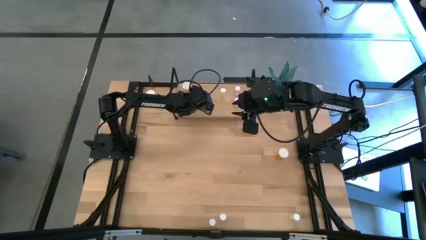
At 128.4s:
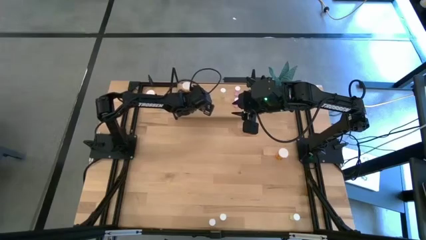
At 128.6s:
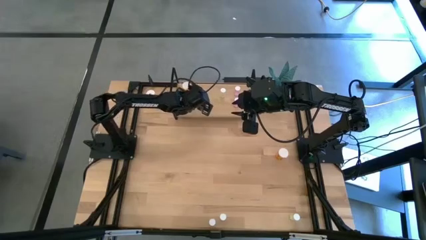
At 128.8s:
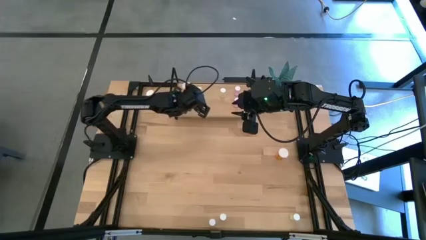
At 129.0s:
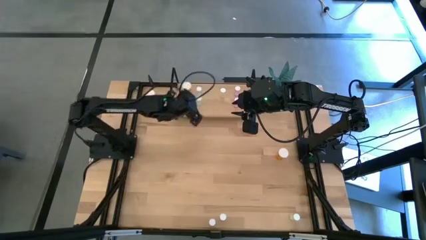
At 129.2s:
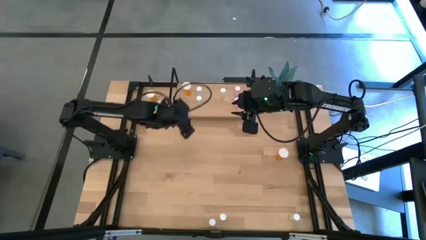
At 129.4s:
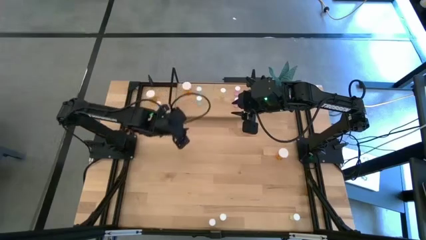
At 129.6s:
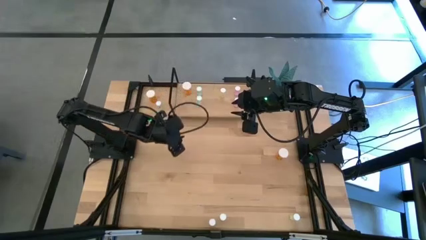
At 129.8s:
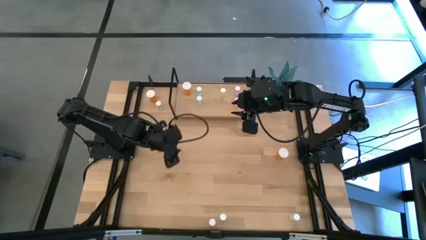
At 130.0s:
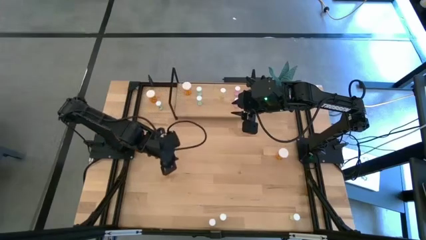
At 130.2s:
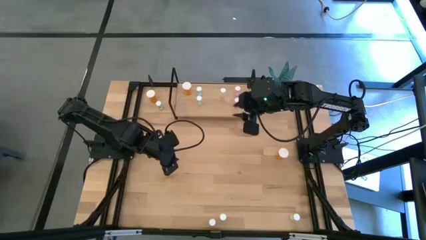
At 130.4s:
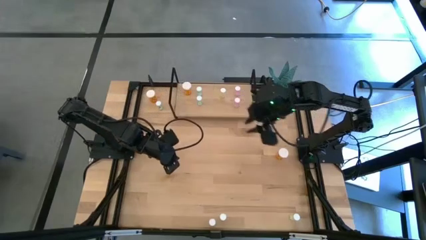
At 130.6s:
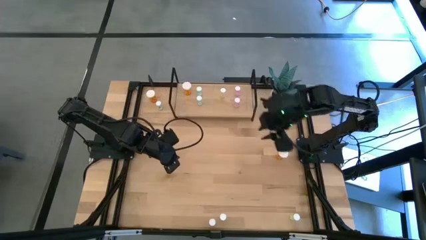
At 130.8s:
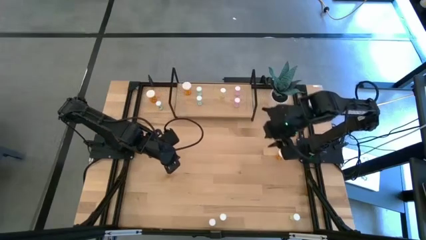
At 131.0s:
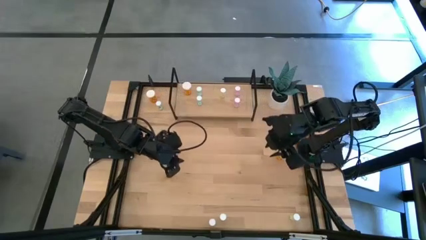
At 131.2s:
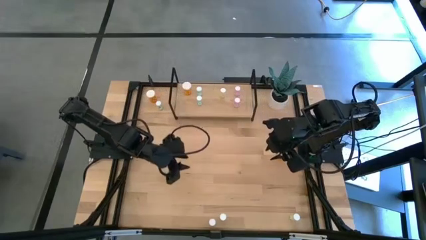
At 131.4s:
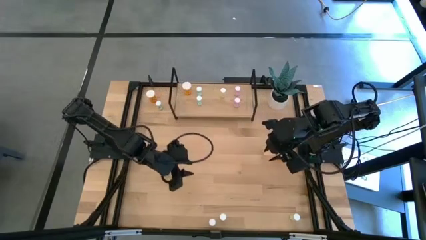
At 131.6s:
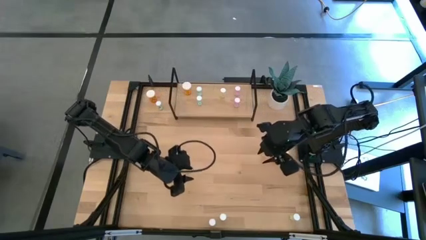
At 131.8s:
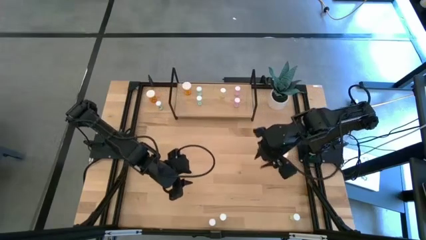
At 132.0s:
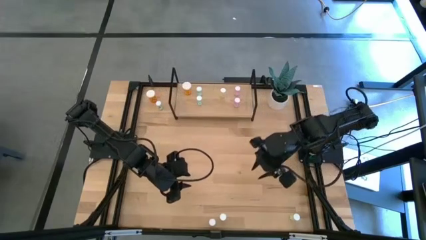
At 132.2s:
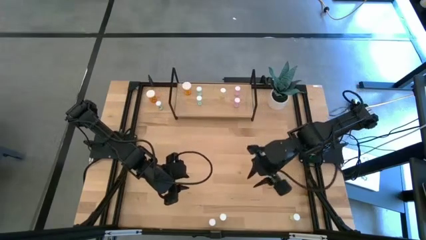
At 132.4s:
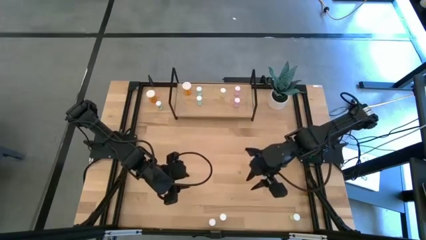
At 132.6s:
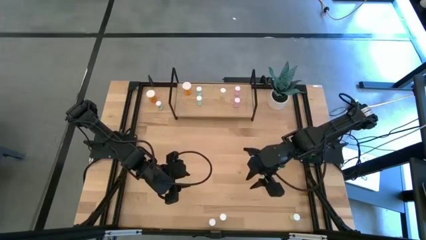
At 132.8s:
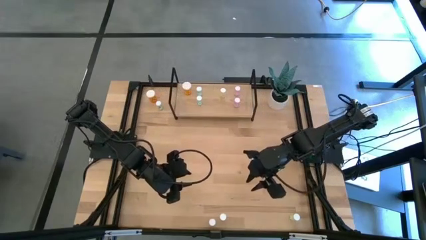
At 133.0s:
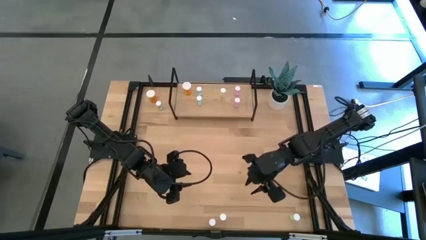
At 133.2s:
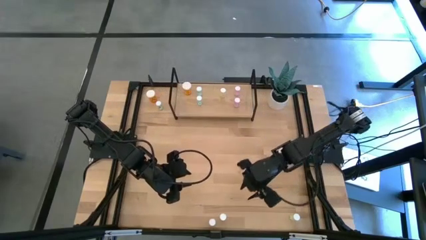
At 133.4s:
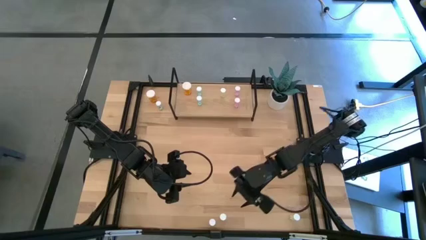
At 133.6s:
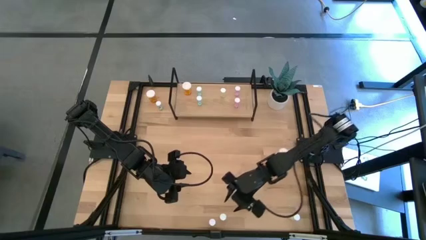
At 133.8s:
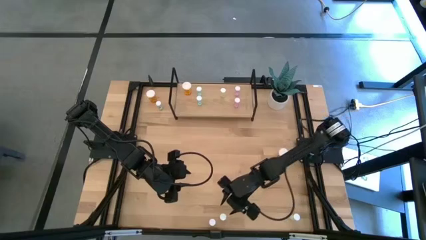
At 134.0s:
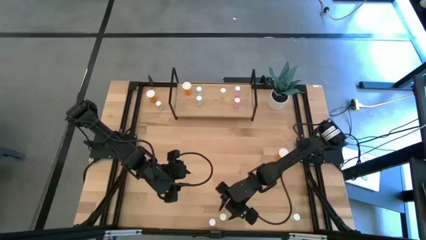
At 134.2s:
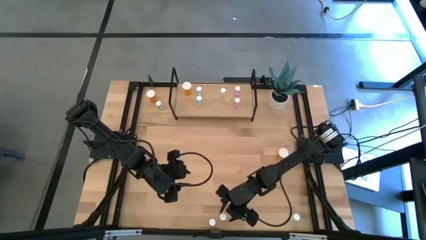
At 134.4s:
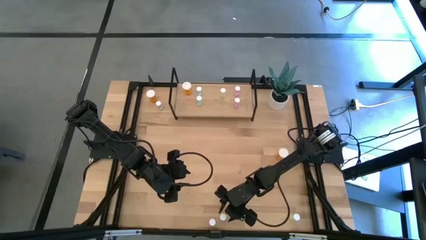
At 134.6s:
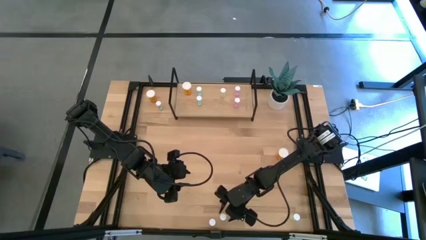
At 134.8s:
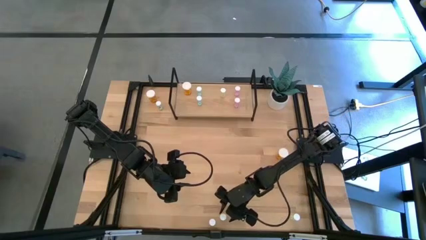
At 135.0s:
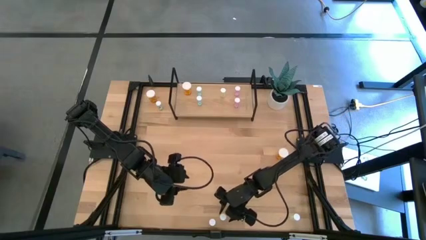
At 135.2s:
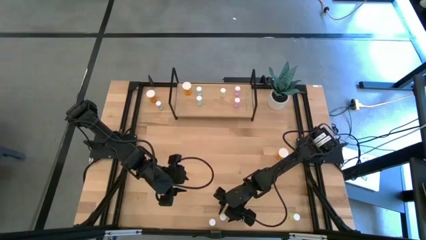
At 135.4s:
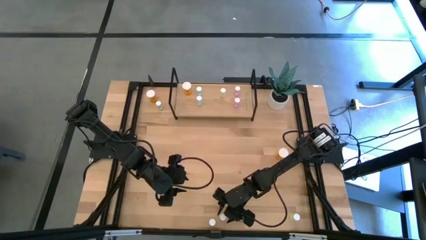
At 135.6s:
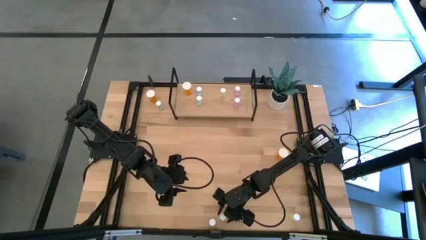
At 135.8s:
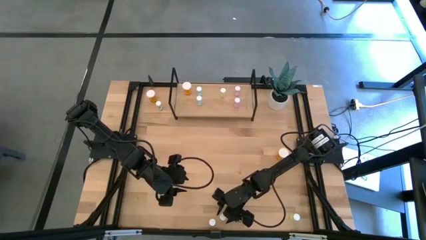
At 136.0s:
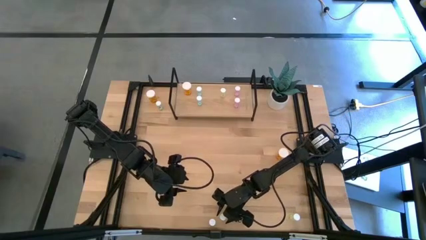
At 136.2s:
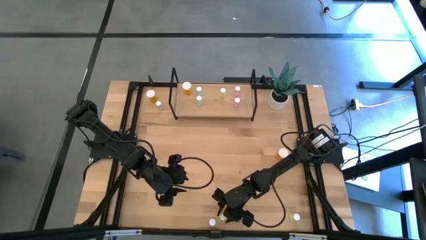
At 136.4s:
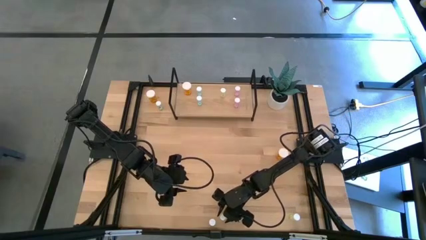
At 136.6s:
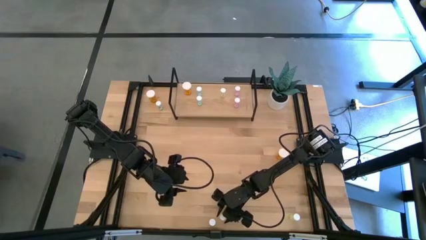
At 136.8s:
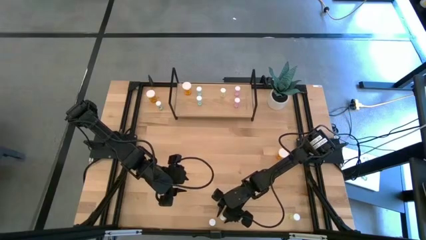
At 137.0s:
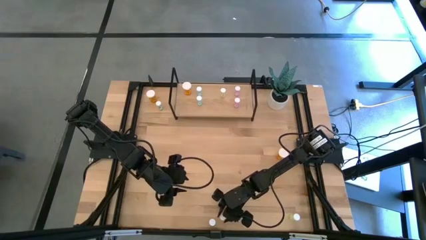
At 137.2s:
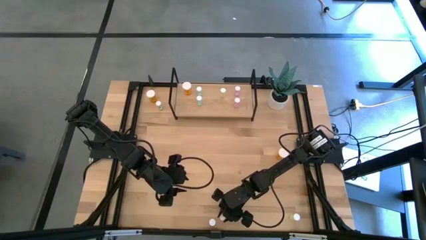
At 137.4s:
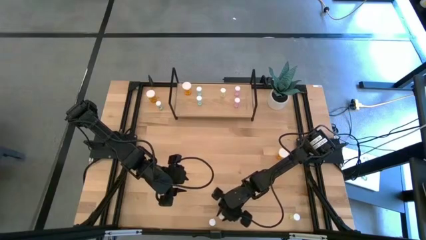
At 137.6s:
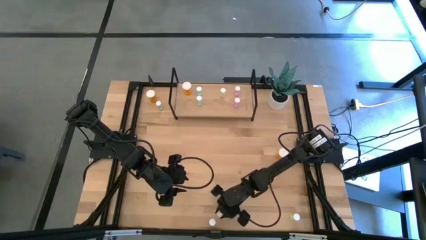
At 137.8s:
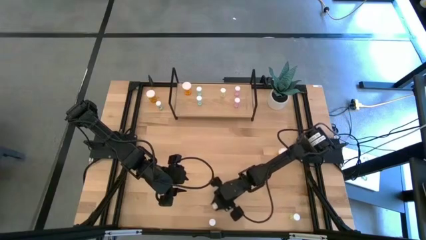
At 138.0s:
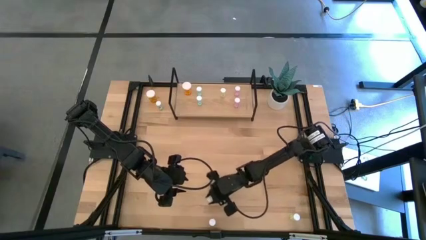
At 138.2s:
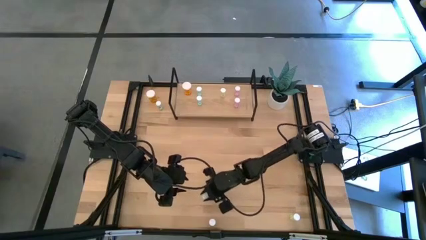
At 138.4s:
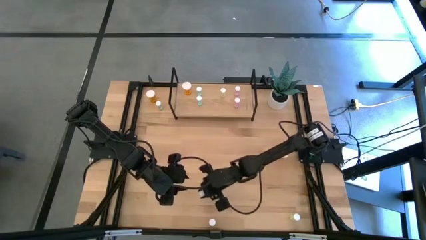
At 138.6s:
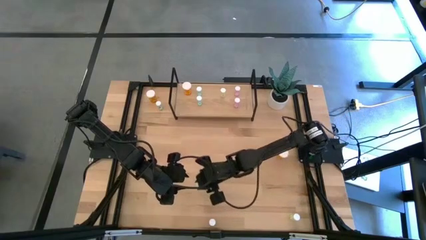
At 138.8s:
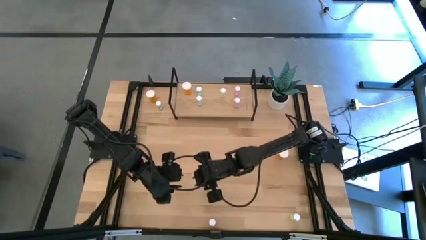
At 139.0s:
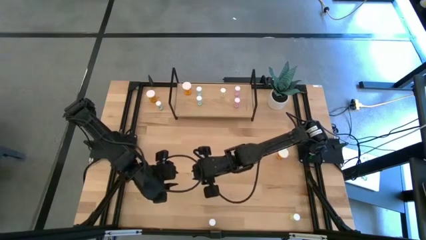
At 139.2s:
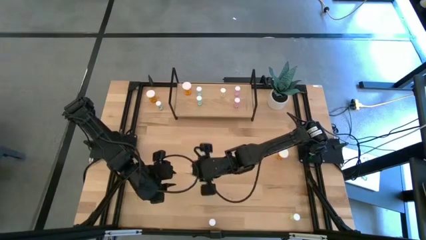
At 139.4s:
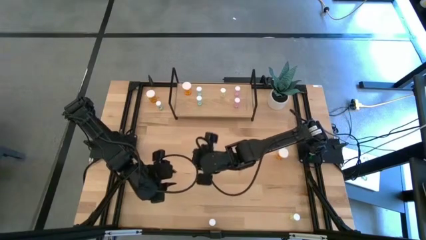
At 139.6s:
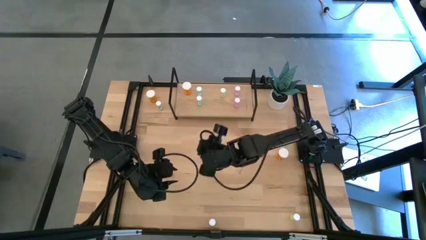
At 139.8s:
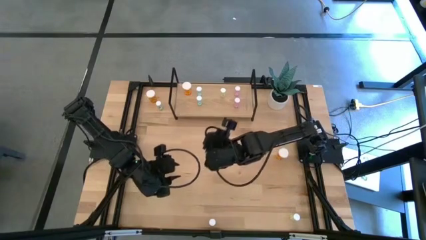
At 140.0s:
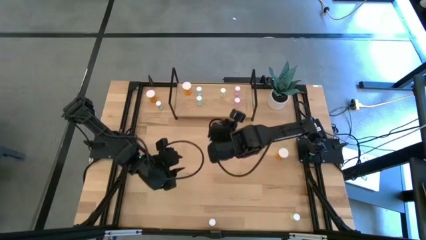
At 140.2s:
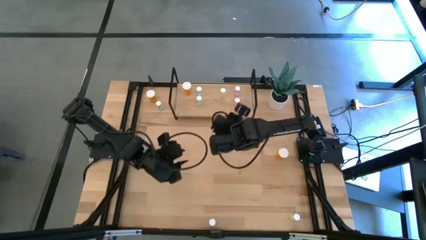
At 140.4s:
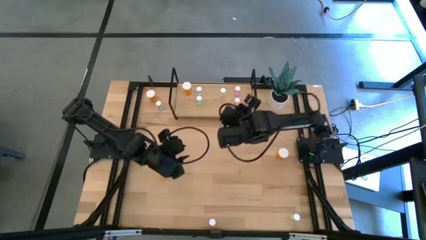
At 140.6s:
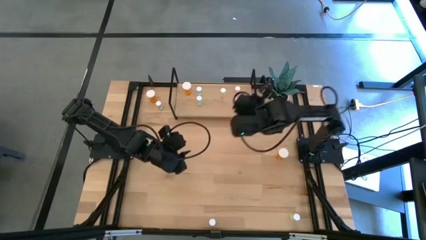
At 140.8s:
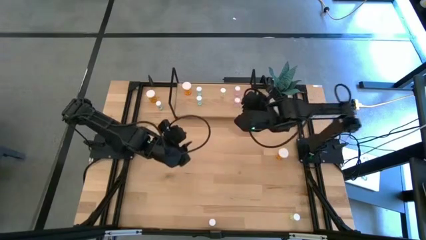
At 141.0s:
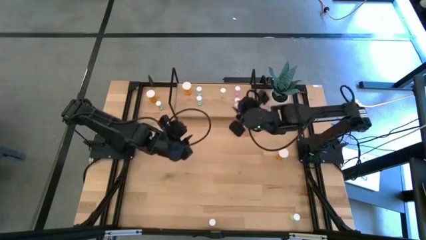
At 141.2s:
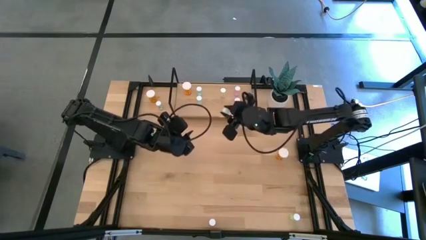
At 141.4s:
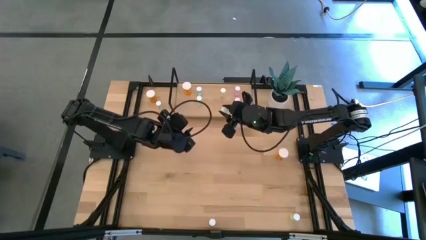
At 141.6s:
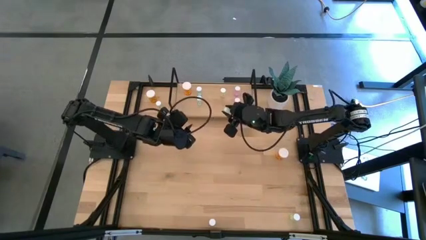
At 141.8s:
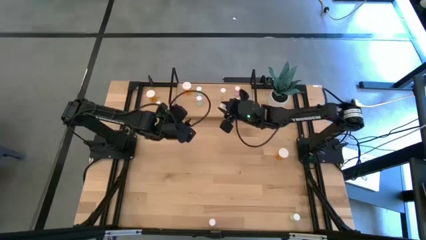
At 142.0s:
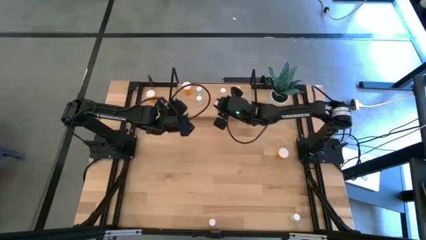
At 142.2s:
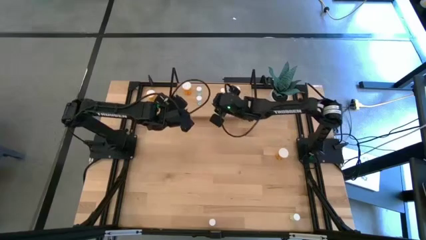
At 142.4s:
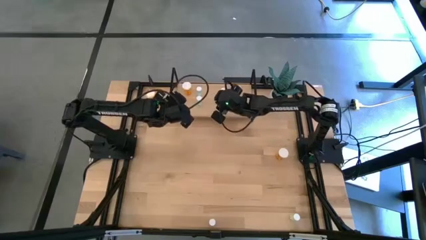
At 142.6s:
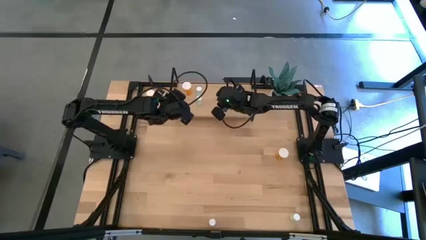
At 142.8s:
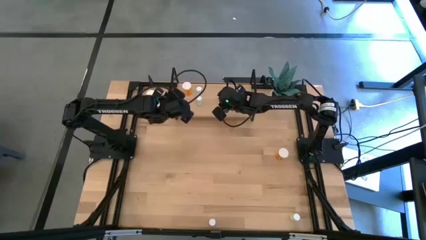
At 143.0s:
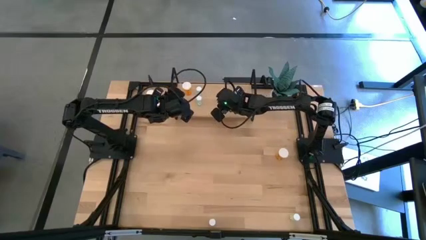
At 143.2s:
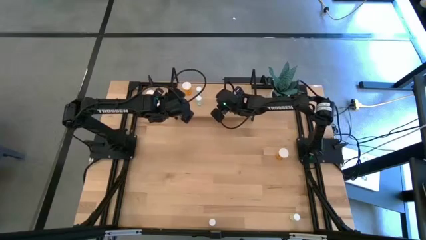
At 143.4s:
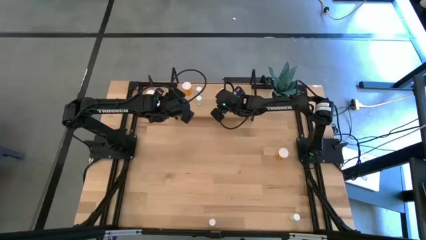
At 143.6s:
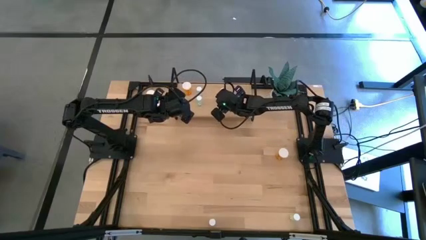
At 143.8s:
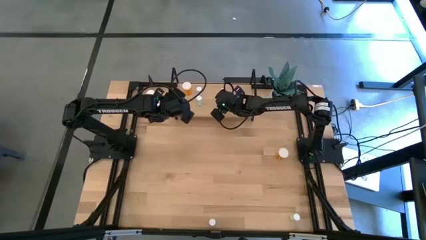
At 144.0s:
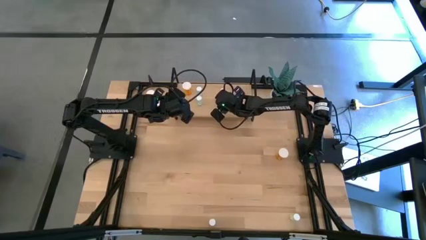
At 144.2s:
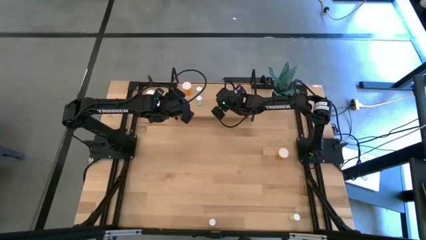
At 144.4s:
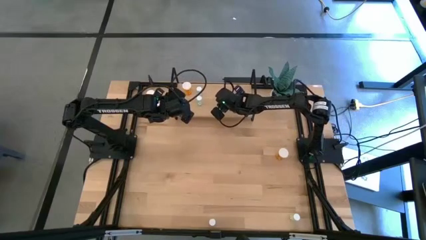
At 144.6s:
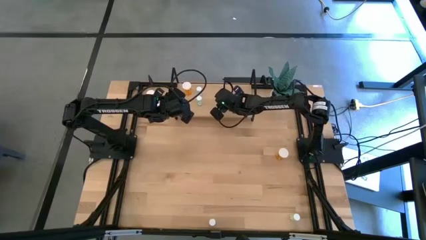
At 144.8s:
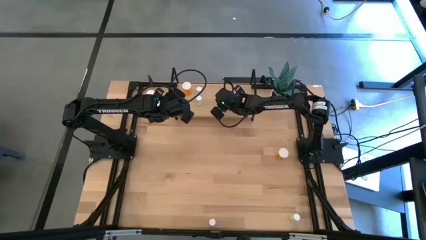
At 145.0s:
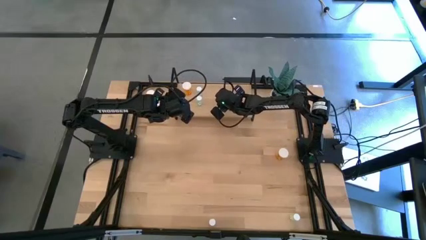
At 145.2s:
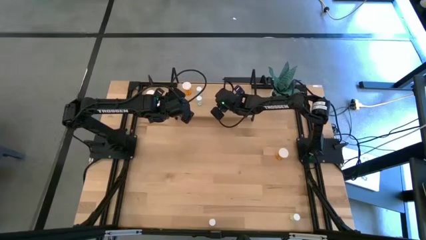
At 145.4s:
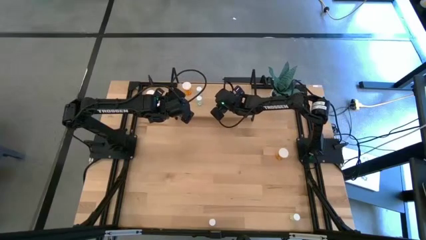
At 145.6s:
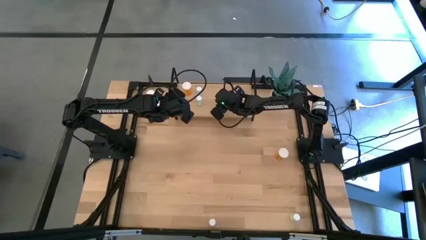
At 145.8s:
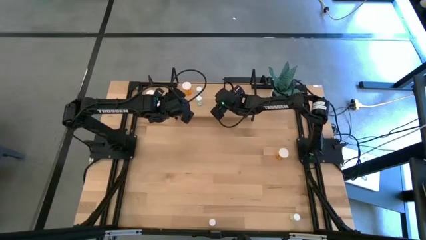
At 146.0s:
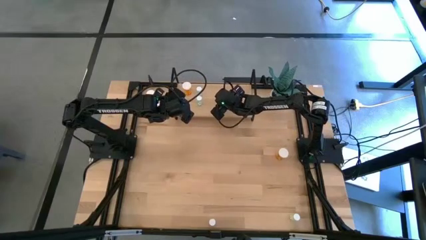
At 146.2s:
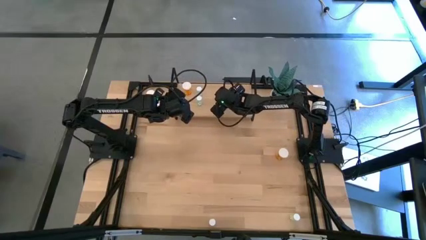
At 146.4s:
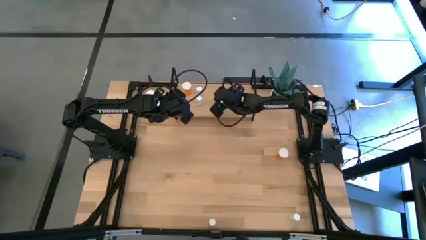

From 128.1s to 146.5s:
Task: Pick and place medicine bottles onto shelf by color
Put the left yellow pill bottle on the shelf aligned with the other yellow pill bottle
